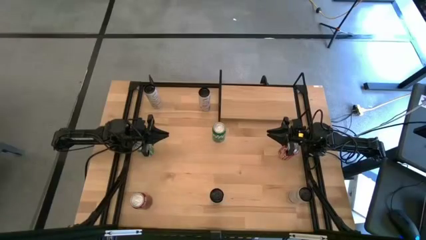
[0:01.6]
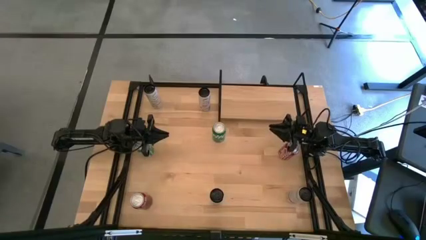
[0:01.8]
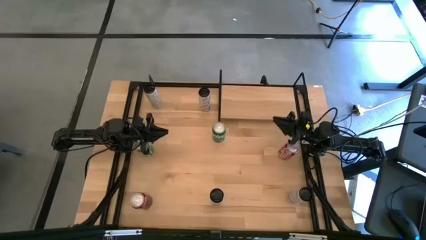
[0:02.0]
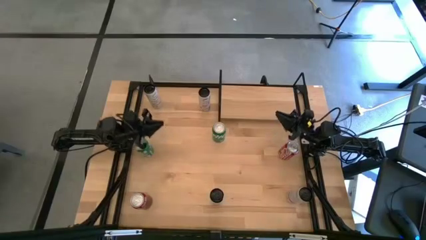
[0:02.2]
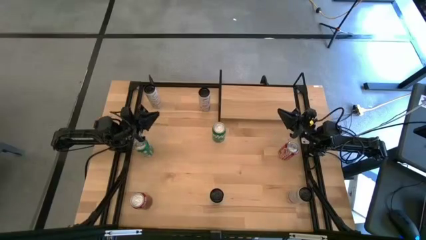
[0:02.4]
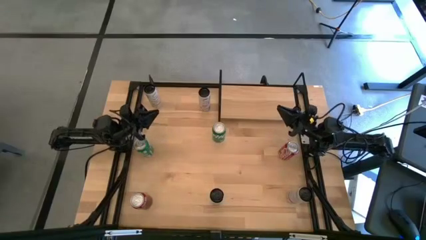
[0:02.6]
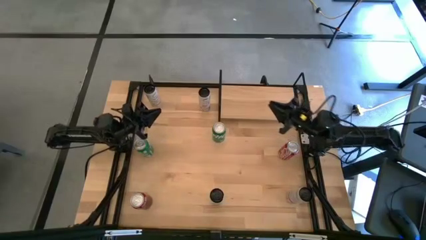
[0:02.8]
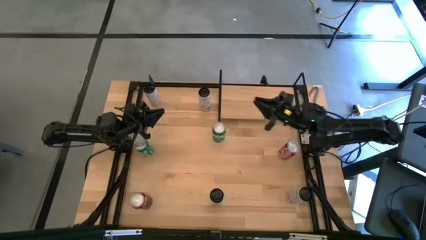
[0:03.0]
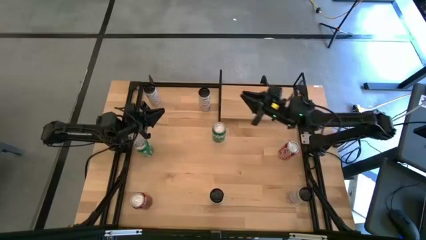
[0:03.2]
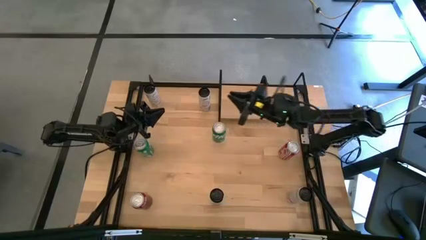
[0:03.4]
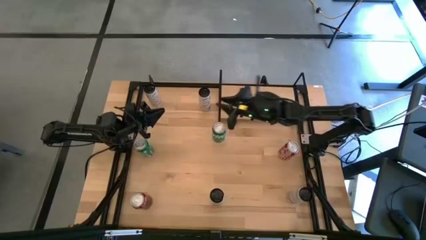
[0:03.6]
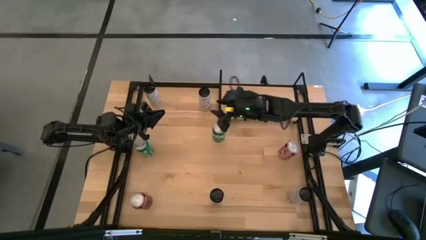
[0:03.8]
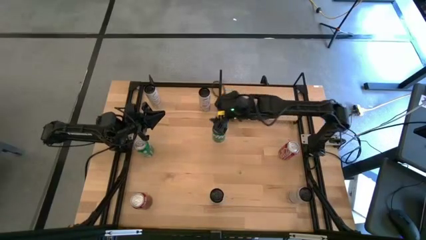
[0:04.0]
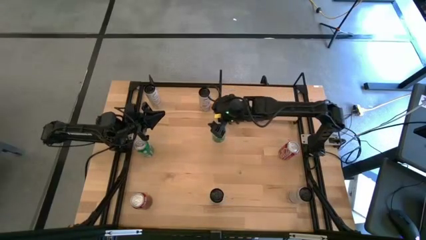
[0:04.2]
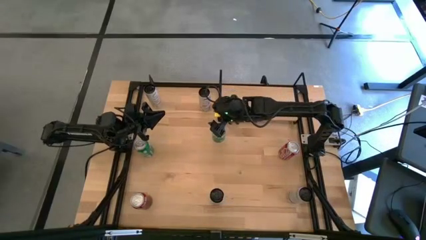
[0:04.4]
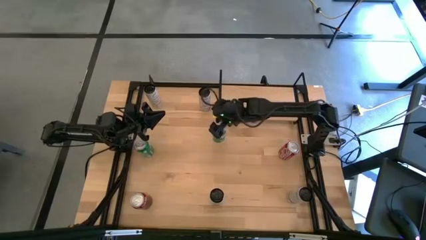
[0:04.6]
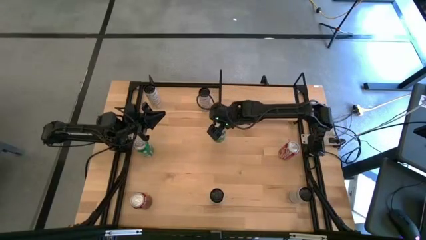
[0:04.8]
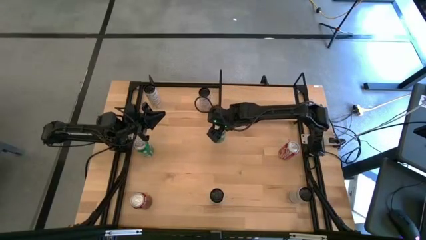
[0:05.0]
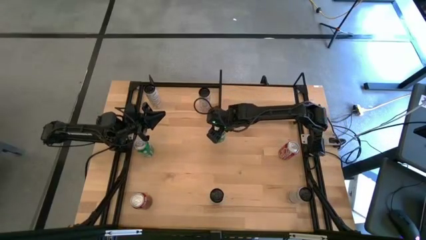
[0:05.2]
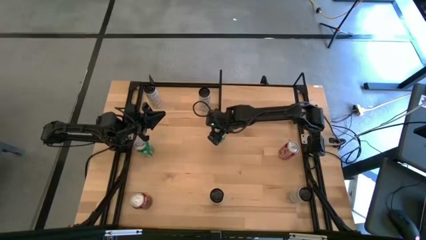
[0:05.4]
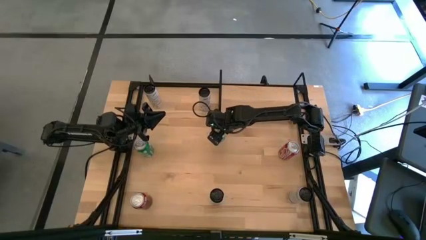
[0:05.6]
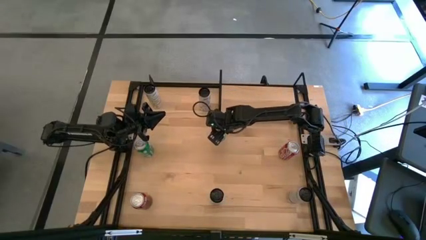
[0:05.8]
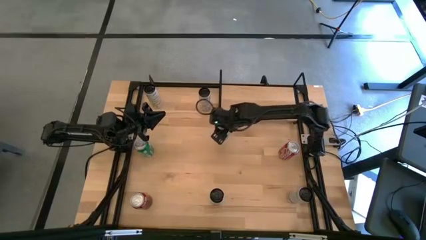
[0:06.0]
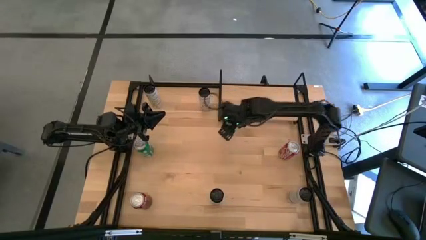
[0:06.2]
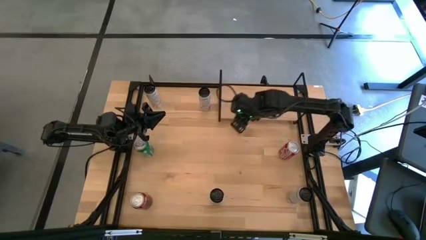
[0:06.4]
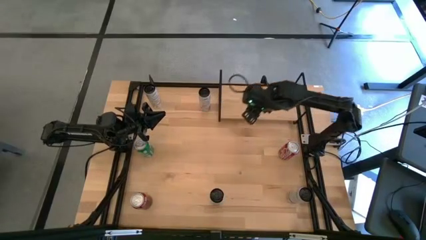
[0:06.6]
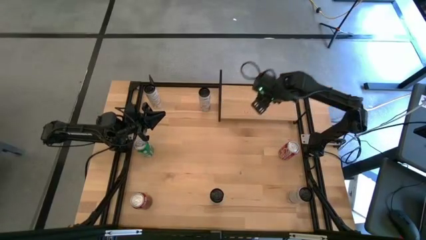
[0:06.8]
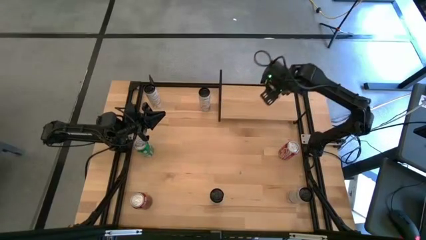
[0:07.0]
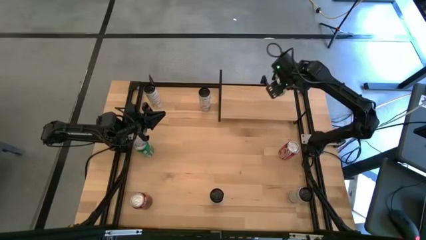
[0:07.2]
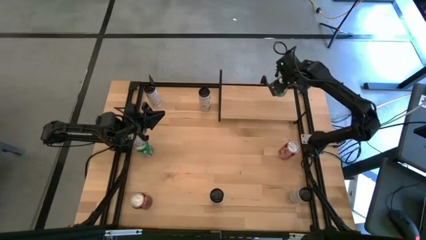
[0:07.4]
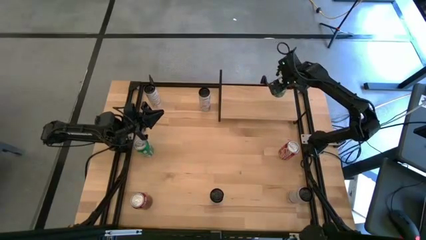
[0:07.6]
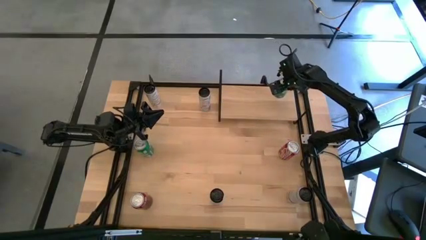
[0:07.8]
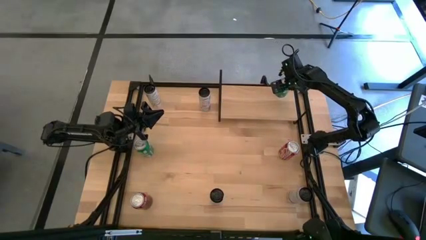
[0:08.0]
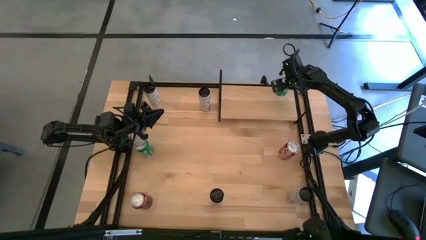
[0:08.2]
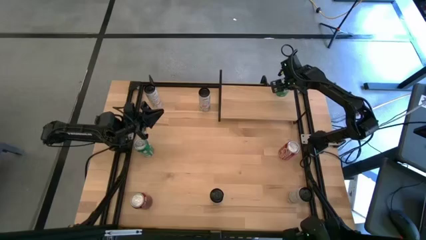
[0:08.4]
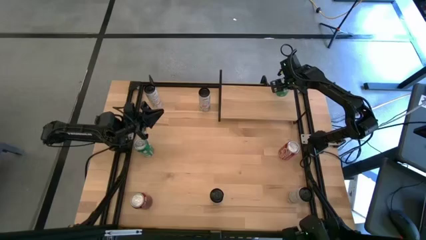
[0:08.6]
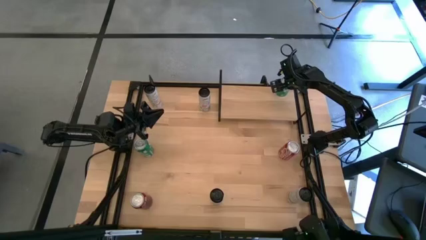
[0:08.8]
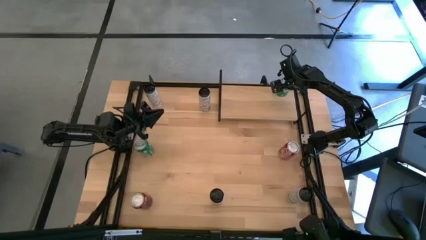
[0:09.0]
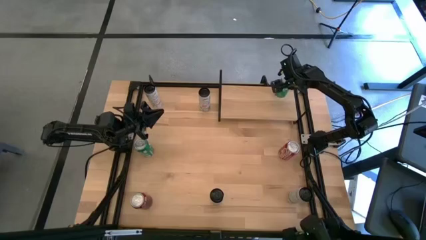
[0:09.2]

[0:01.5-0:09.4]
Task: Place canned beverage on shelf
Put the right green soda can on the shelf

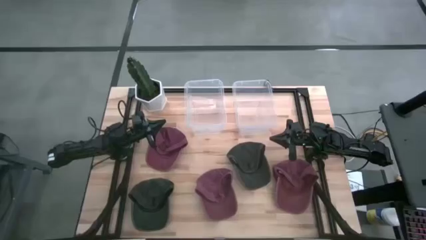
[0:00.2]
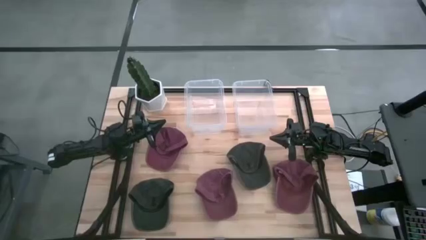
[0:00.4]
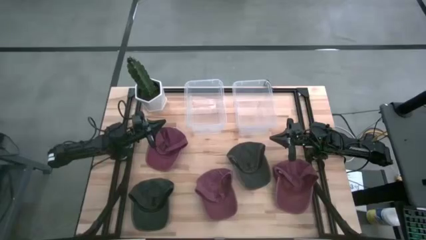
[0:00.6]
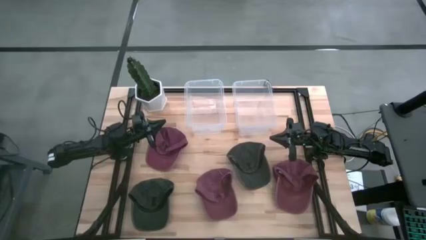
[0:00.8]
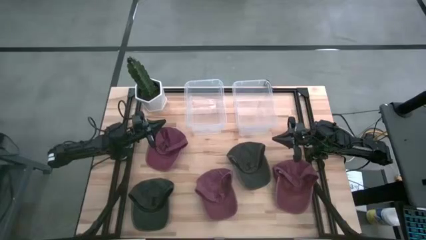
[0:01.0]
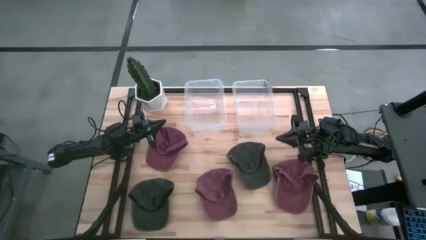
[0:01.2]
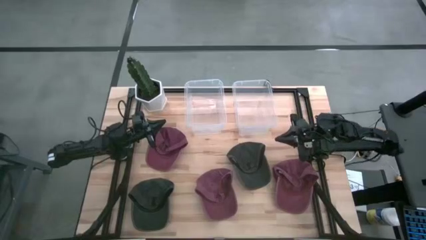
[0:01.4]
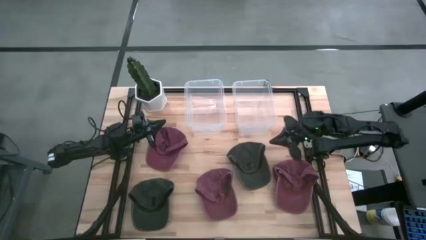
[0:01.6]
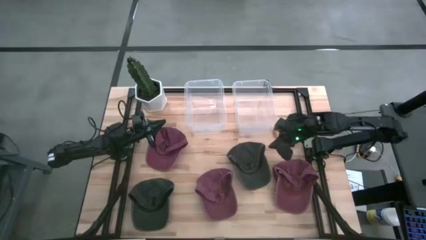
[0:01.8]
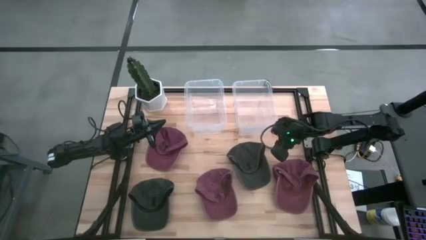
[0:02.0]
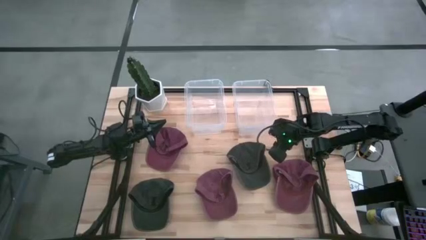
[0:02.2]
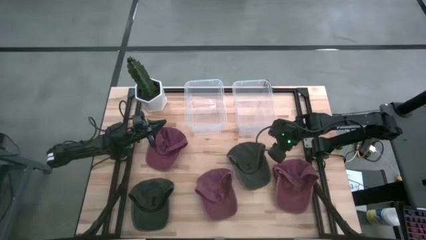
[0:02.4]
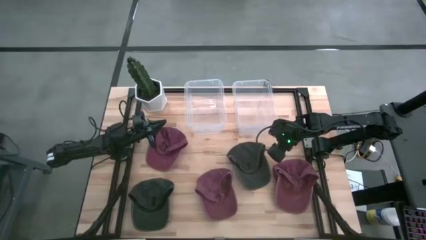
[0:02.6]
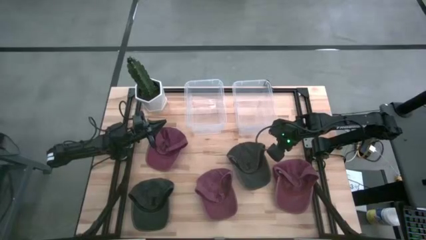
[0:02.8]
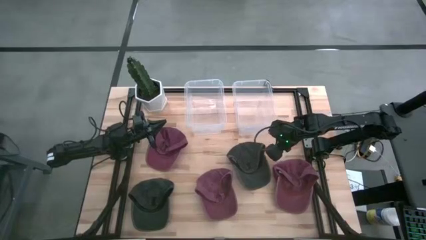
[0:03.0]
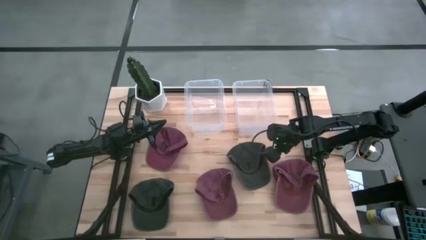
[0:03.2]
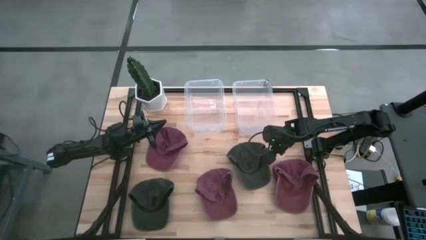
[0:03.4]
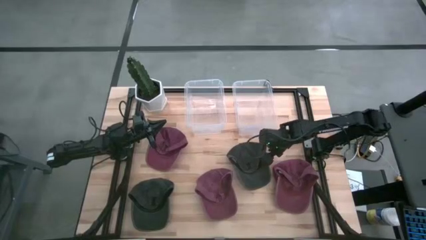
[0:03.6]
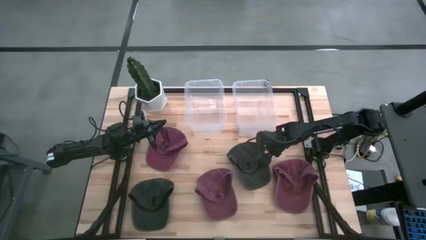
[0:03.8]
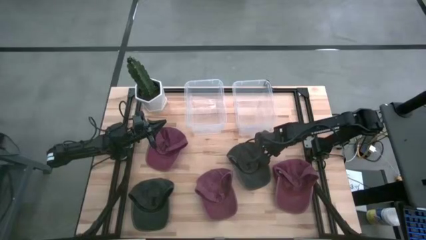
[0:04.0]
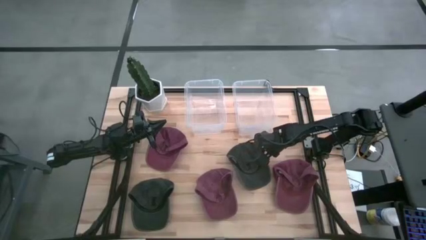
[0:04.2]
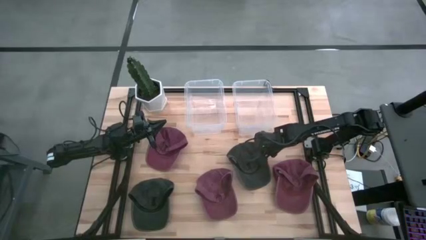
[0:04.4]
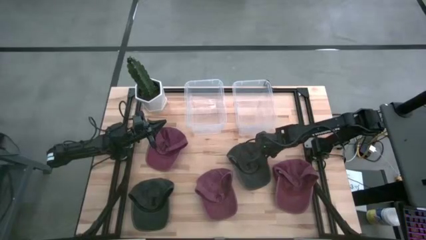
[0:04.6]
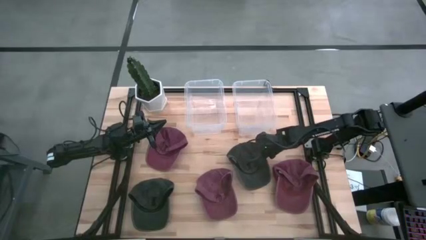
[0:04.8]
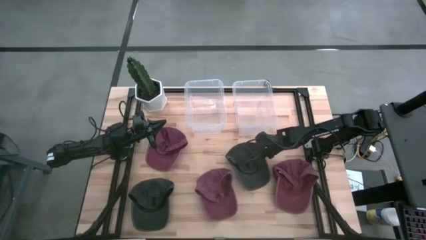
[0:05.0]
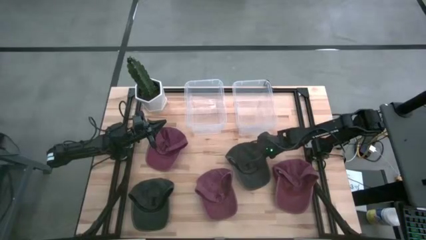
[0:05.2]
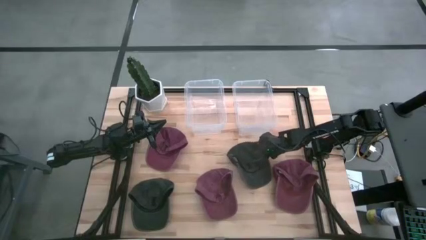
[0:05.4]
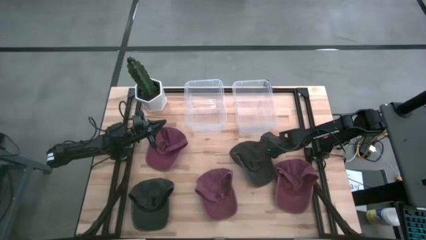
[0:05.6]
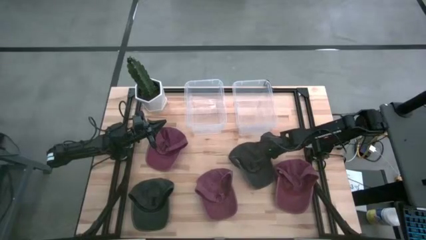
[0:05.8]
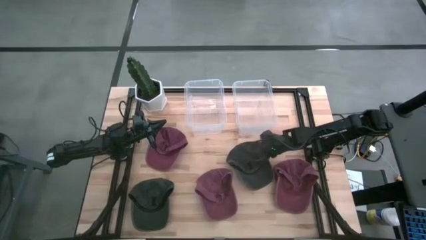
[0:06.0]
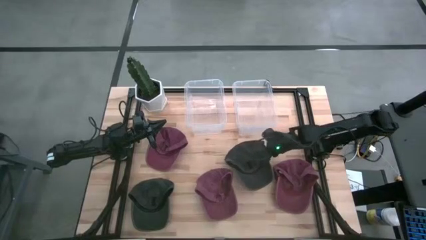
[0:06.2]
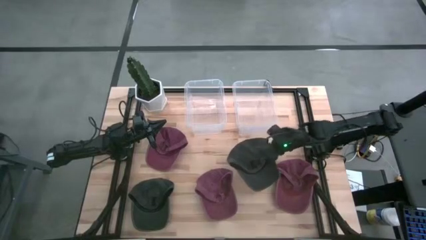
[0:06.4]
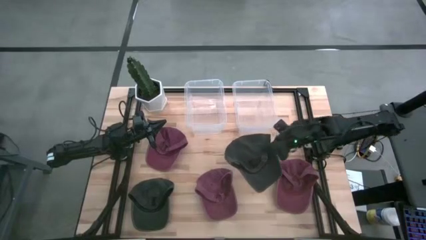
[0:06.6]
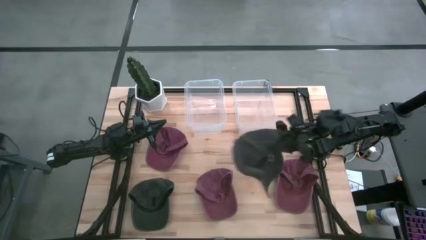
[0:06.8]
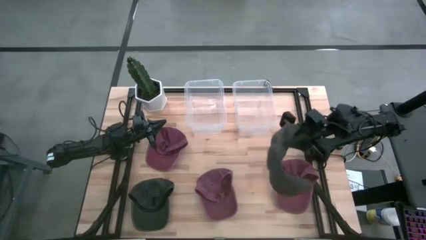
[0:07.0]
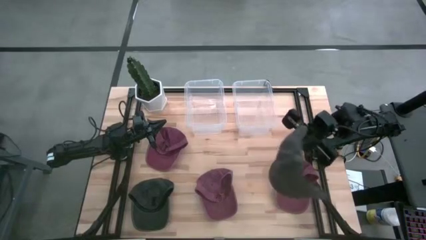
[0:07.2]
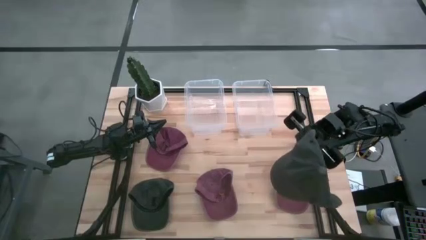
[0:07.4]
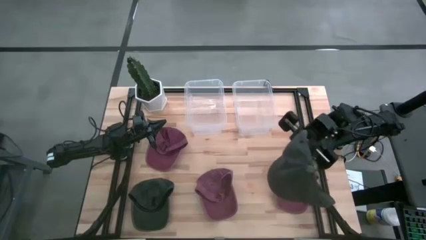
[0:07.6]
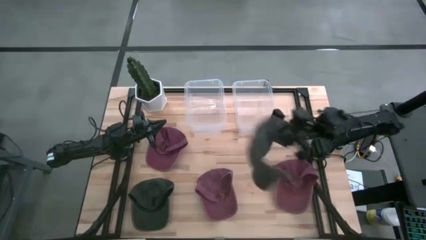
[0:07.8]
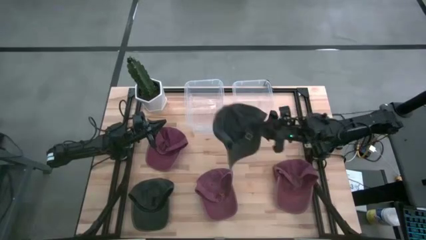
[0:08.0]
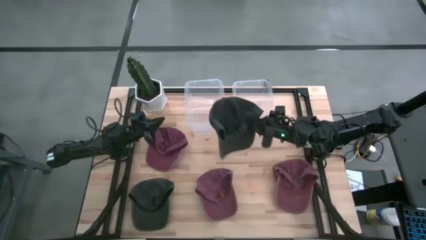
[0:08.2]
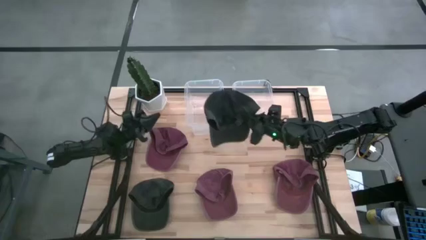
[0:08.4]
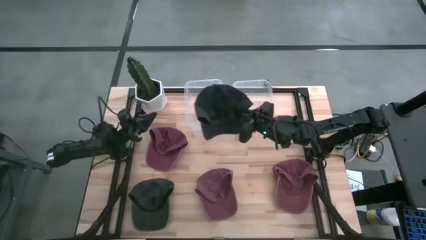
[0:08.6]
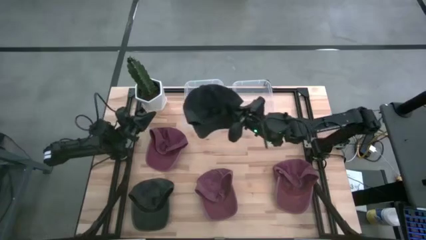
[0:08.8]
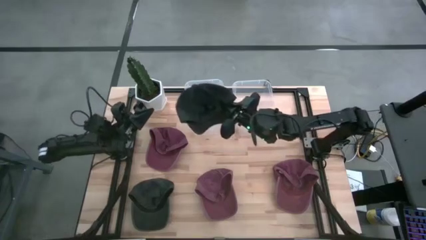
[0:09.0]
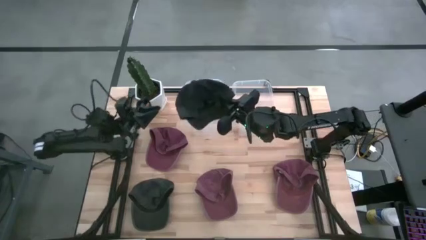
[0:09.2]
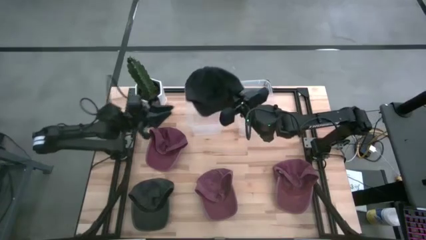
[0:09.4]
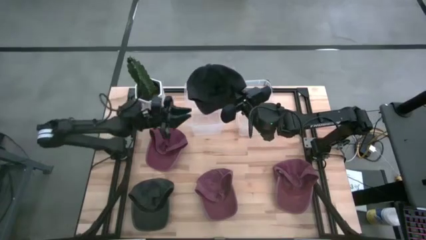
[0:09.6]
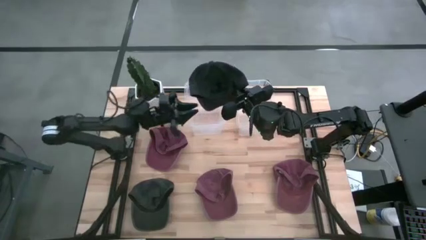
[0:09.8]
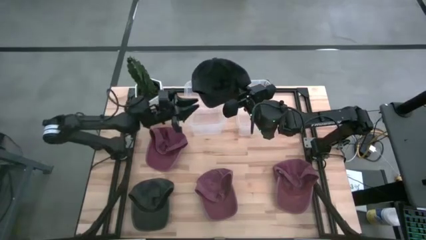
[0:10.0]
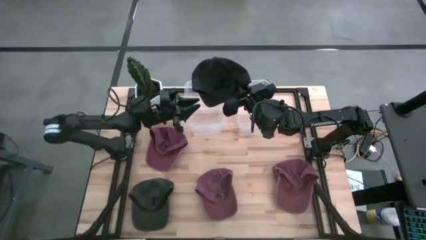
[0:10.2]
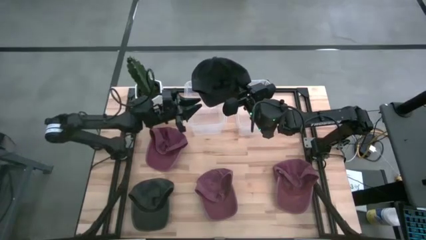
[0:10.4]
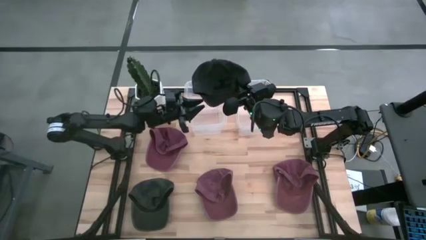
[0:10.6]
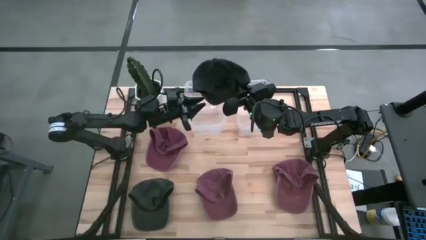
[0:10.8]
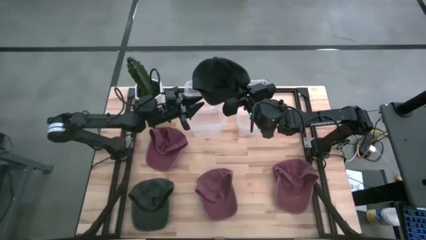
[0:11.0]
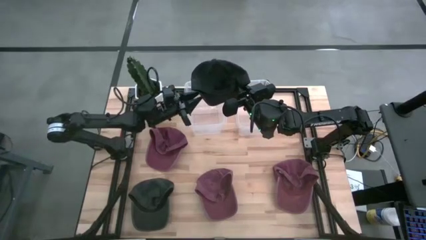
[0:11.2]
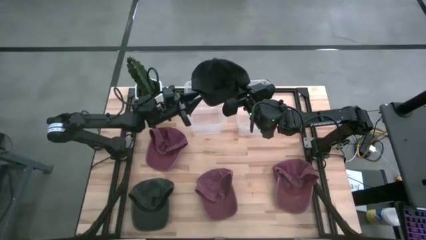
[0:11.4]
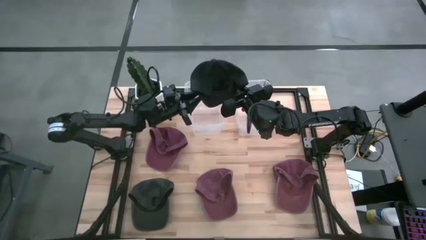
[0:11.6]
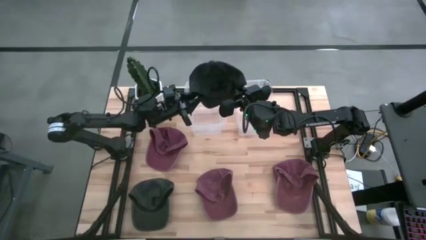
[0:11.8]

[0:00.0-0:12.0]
Task: Pick & Place hat
Put the right gray cap into the left transparent bin
